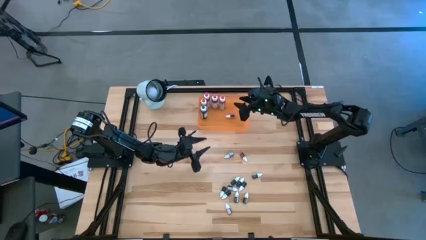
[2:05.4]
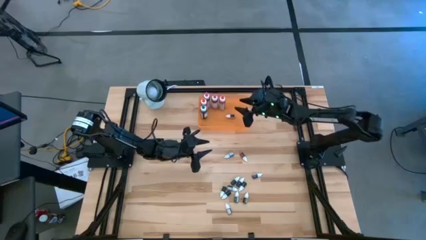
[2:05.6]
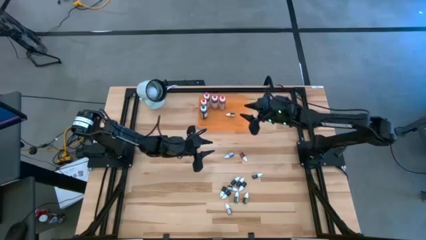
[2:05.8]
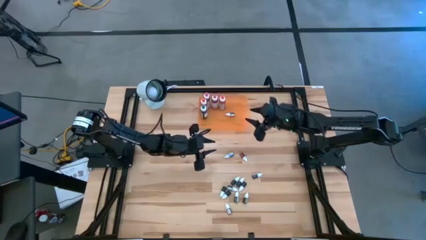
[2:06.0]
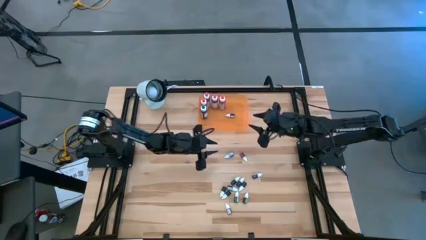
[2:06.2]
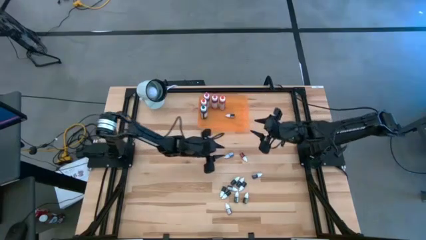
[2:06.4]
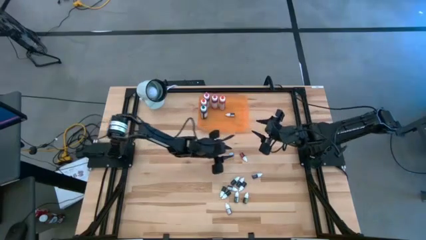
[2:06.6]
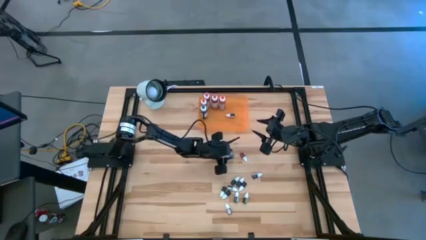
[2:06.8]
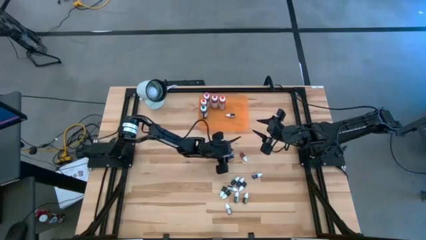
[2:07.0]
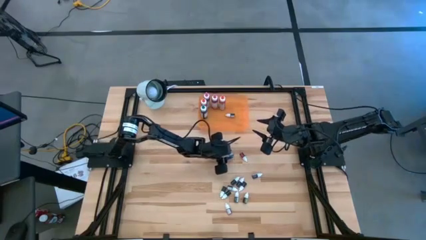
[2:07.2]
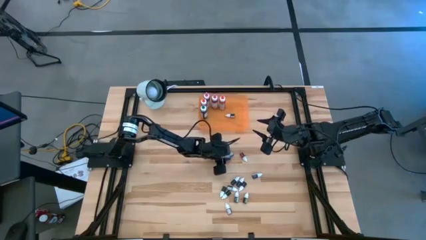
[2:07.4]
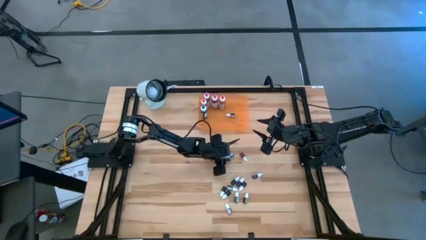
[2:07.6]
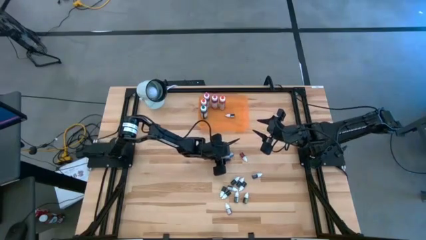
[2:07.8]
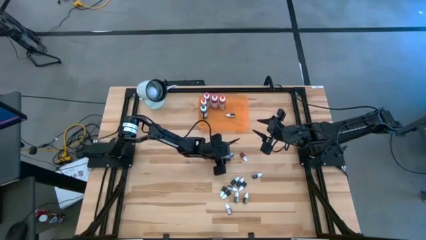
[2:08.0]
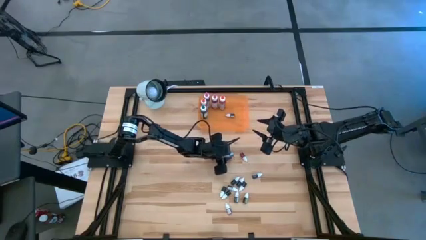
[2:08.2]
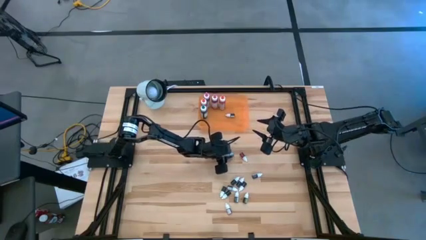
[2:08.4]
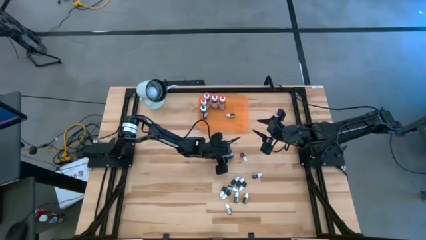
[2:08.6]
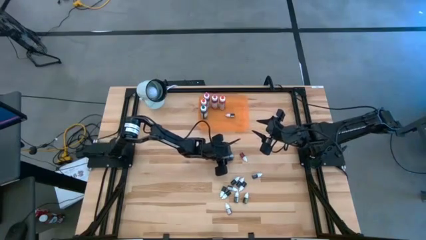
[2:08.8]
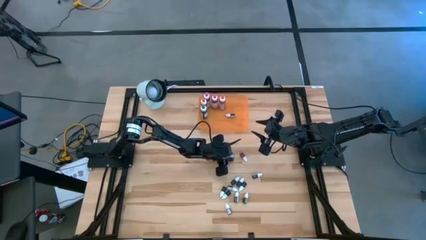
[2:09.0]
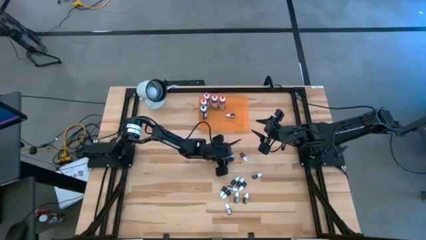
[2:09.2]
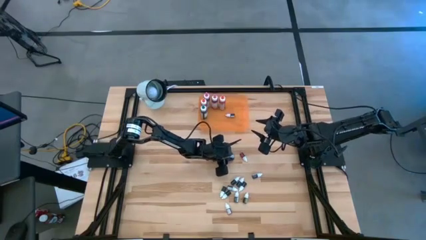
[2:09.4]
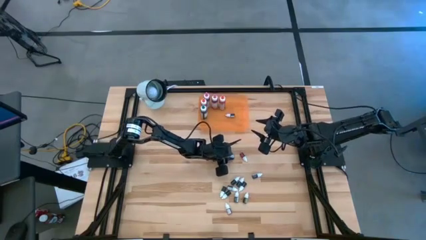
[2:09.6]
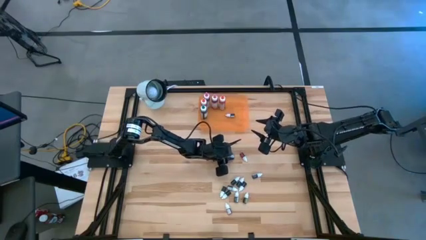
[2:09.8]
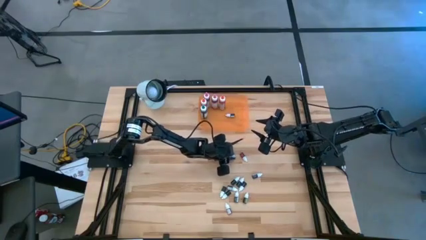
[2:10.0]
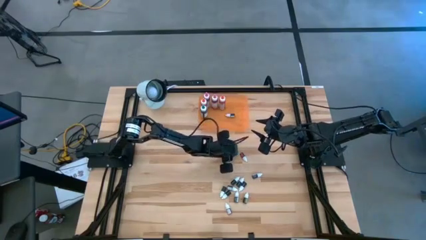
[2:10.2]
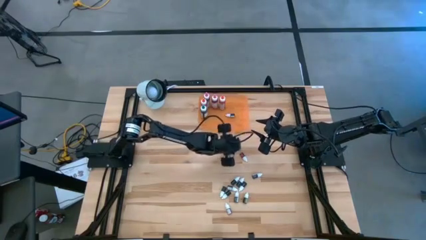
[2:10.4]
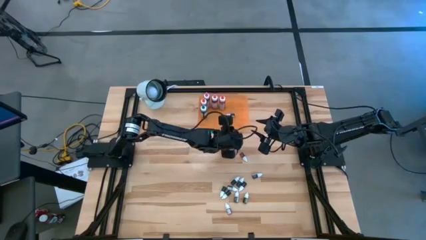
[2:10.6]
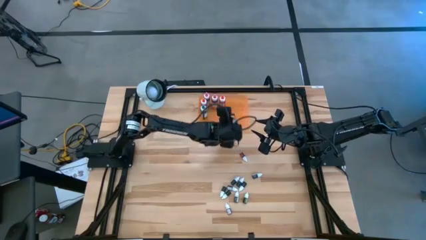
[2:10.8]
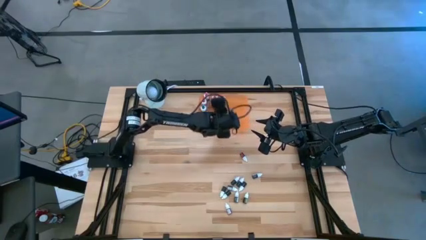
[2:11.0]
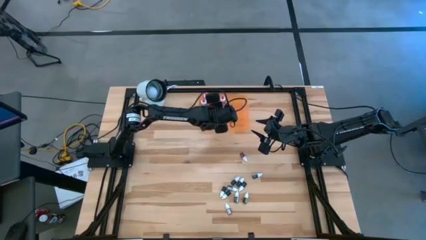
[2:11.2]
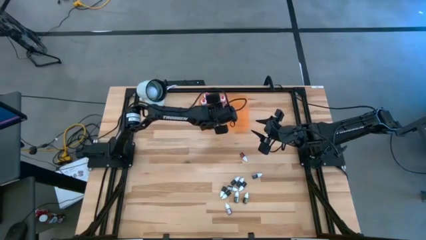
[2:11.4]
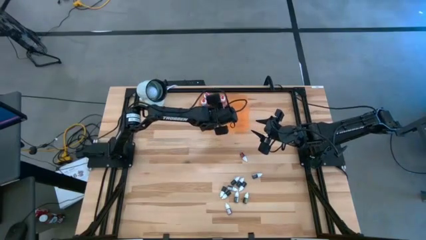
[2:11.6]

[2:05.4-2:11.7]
Task: Pick & Place food coloring
Put the blue small food coloring bottle into the orange bin

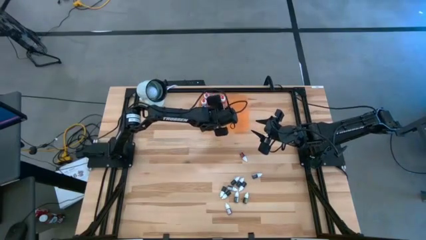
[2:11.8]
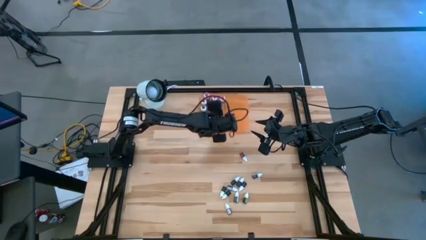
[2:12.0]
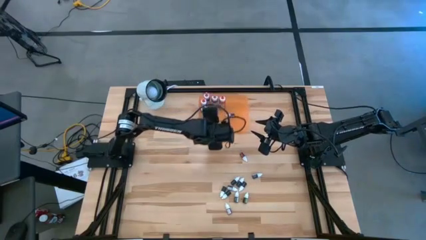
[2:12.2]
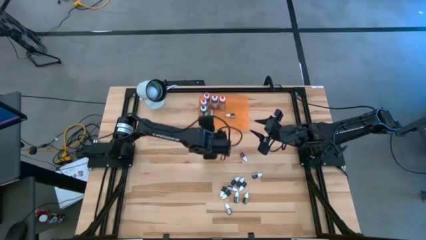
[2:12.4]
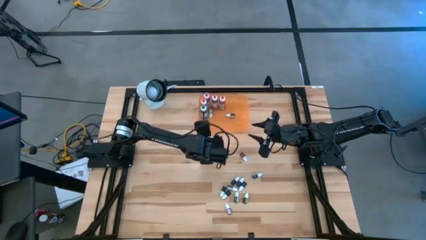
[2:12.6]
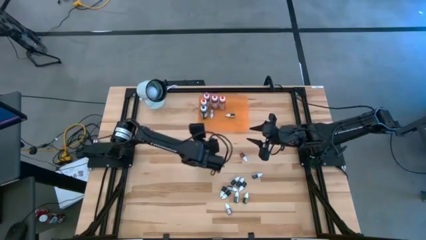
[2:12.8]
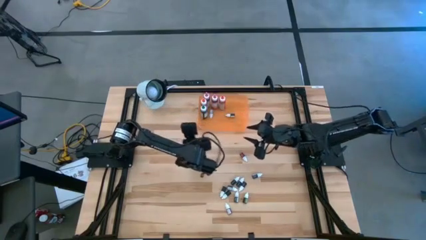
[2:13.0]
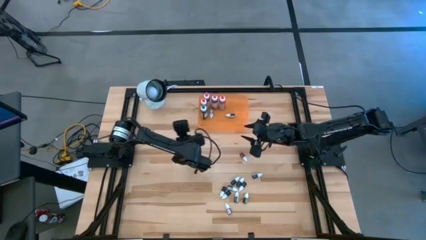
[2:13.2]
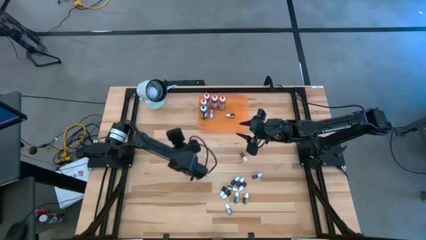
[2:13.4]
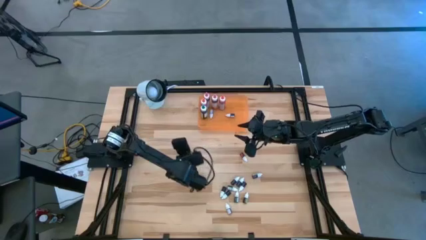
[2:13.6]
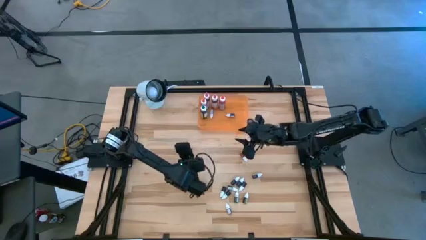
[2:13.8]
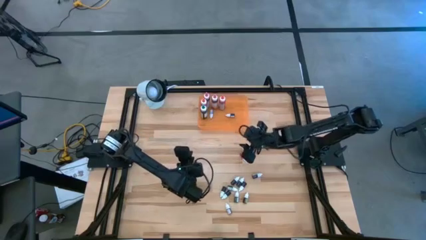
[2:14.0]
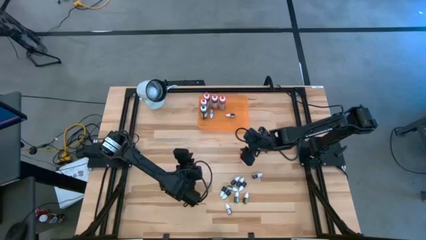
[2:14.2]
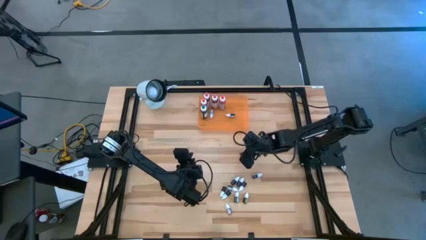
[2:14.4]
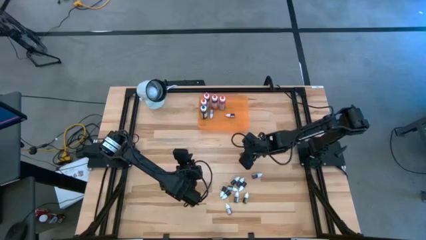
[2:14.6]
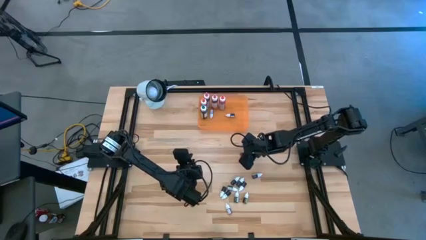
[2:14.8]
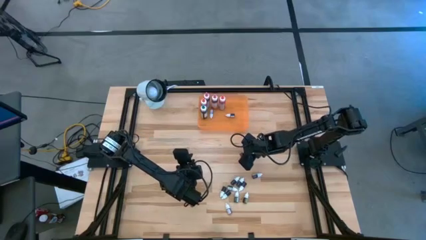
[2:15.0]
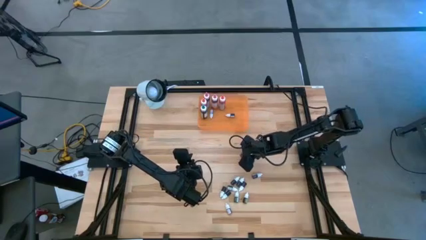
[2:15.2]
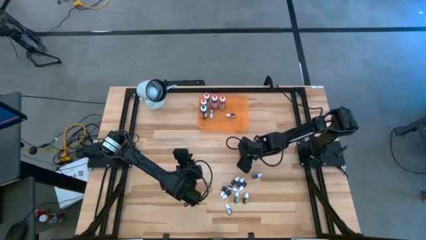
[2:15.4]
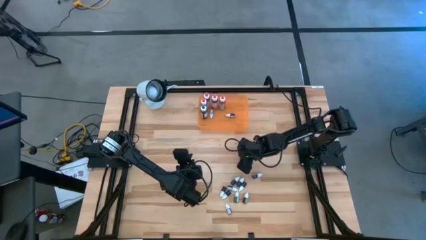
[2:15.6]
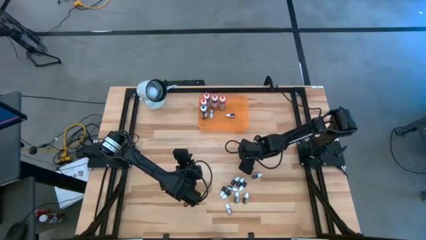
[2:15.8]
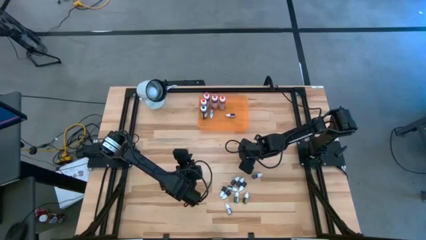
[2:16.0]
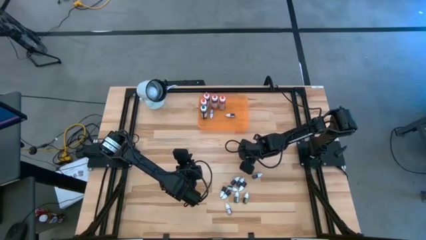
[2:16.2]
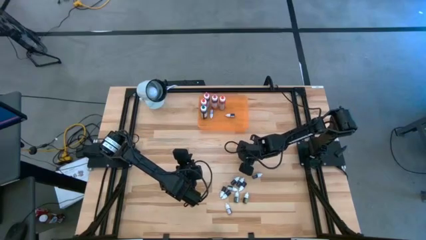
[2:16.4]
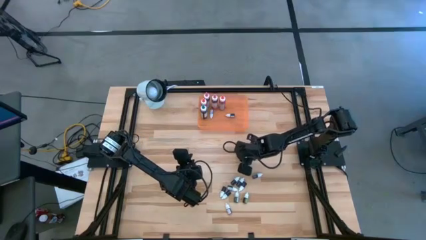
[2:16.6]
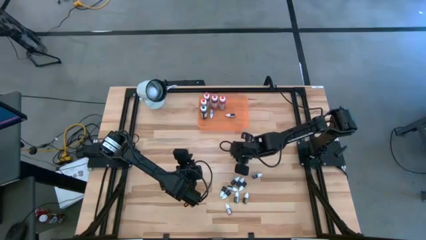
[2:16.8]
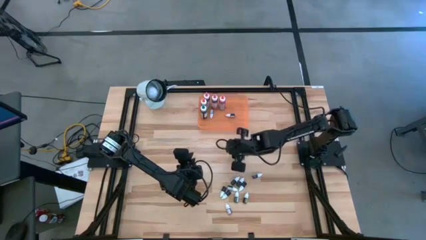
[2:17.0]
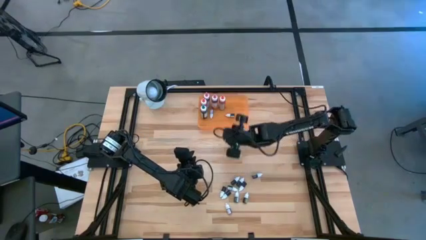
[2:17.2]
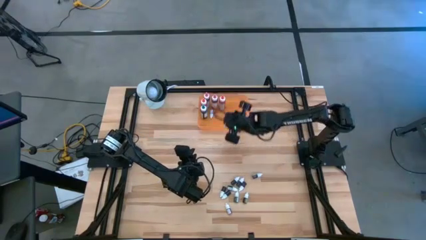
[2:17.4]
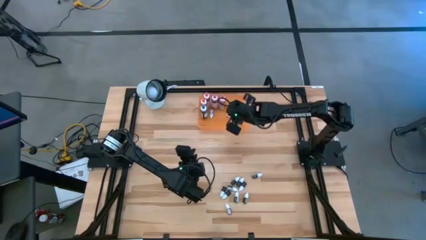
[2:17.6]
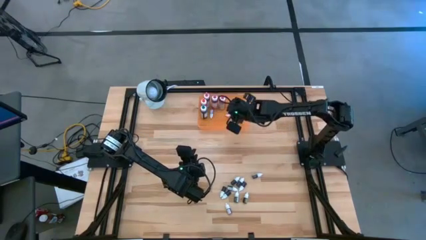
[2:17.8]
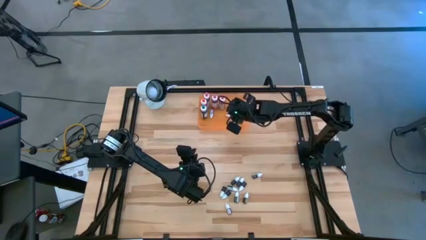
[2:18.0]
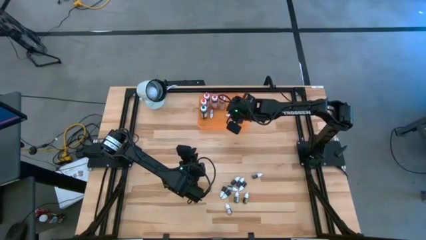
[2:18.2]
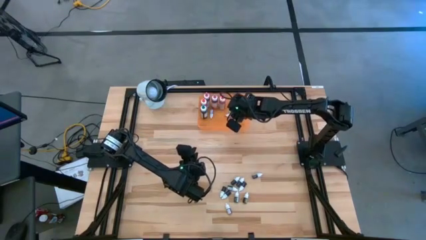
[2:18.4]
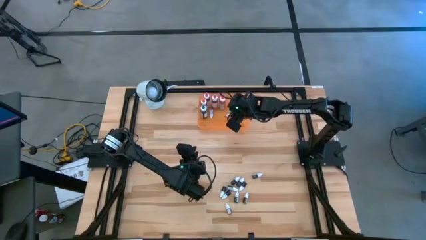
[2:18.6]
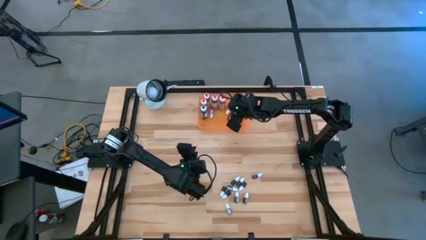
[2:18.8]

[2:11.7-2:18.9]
Put the red small food coloring bottle into the orange bin

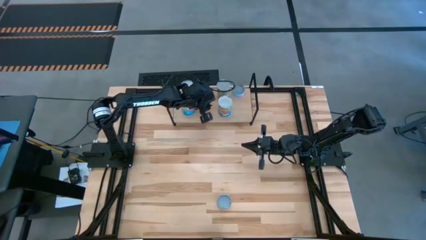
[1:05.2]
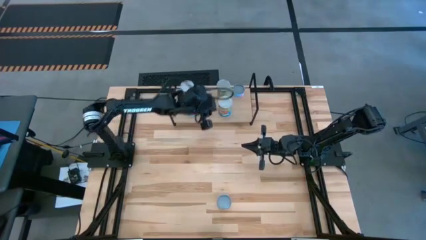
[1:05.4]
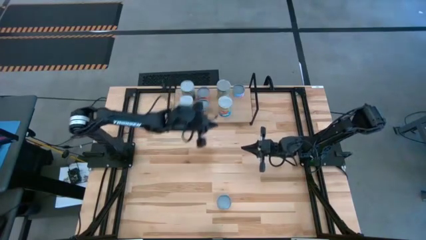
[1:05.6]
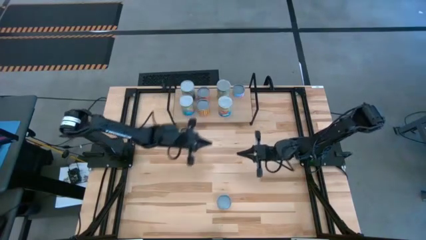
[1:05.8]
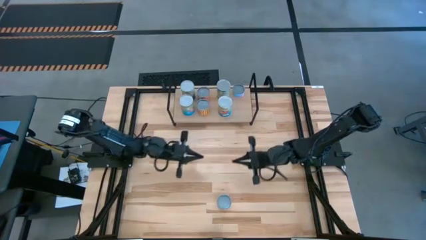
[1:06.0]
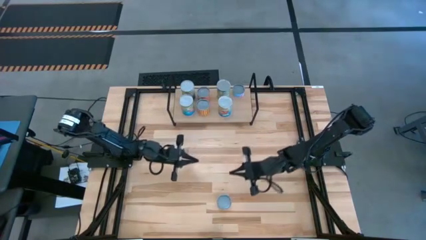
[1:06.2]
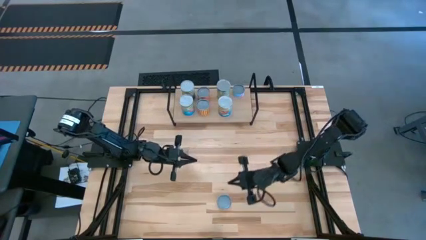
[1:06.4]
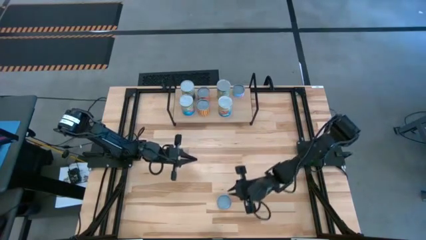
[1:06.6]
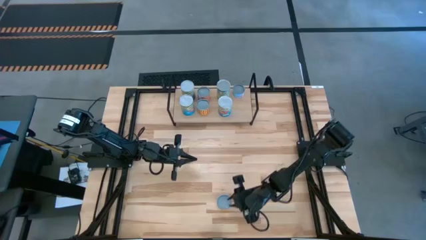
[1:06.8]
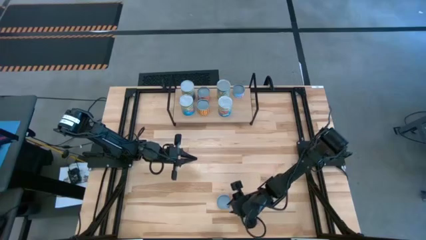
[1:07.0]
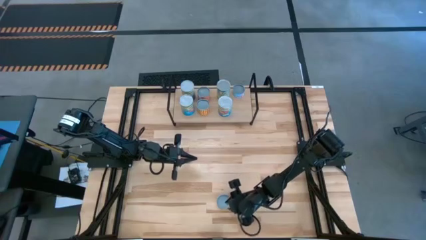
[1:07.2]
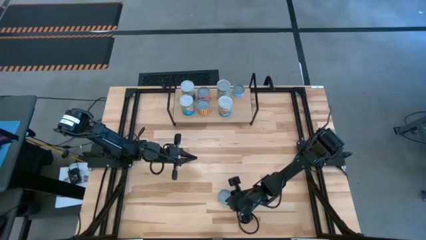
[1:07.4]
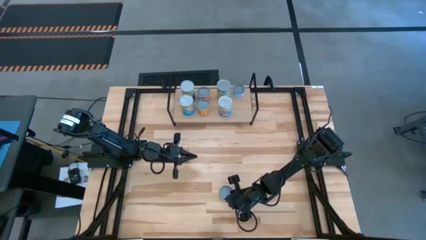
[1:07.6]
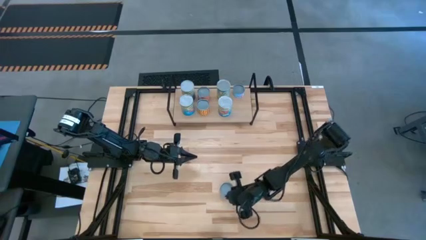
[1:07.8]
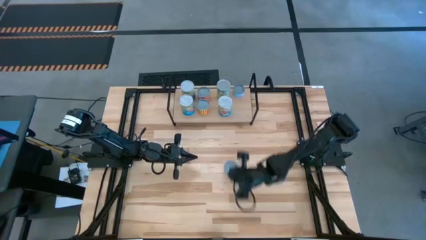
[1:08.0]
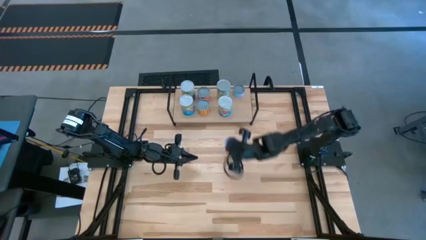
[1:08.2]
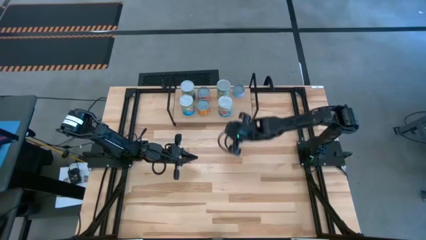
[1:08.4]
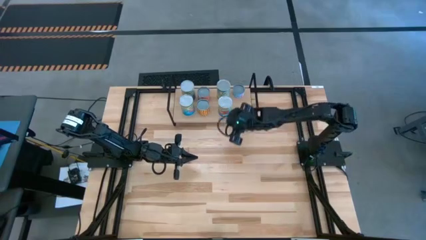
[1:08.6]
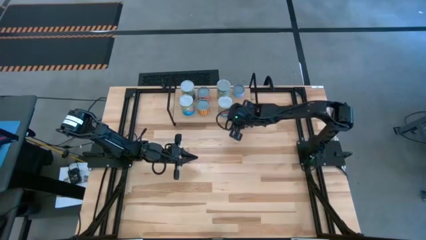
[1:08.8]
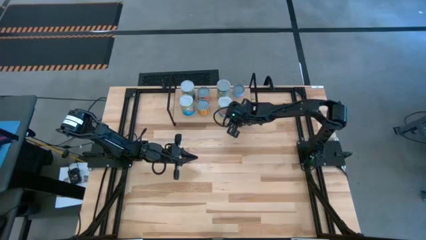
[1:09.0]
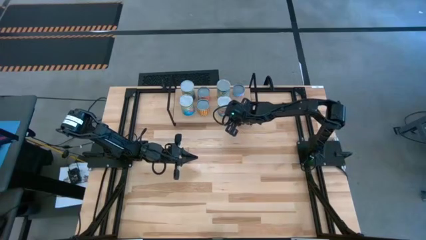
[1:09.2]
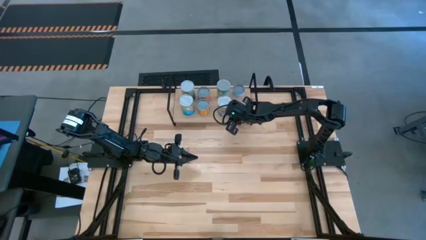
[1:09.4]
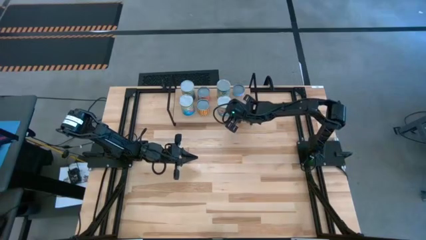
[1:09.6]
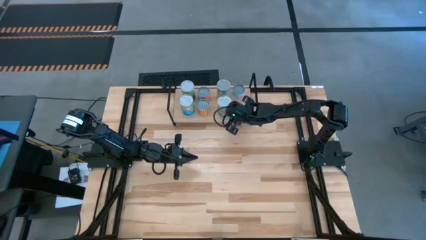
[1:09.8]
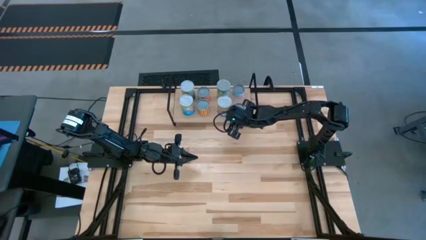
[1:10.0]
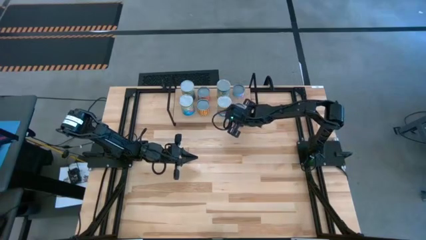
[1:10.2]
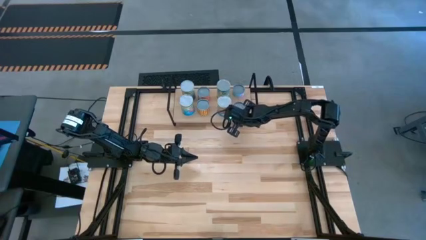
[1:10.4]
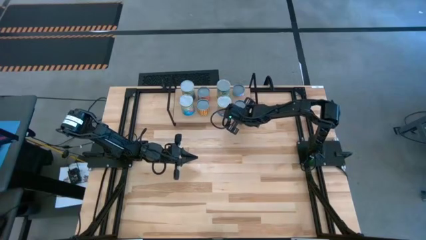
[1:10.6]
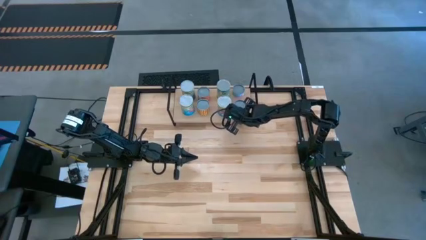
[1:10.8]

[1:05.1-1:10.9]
Task: Pick and place cans onto a shelf
Put the canned pineapple rings on the shelf
